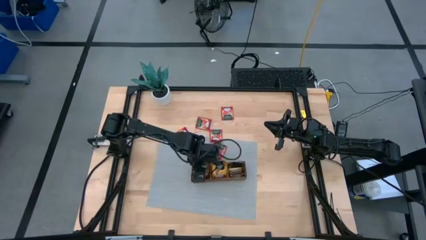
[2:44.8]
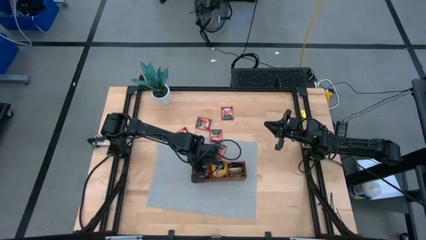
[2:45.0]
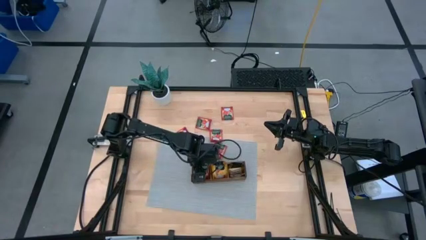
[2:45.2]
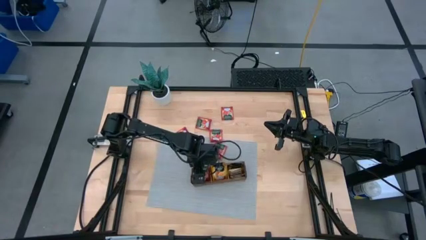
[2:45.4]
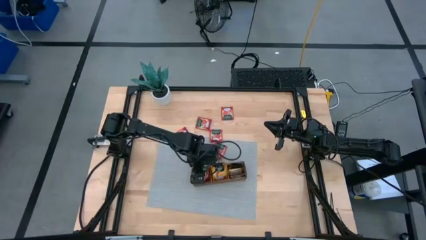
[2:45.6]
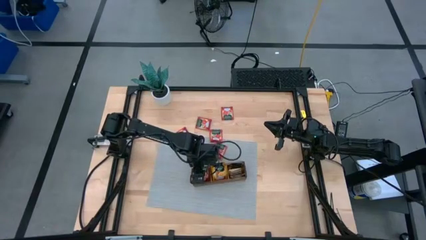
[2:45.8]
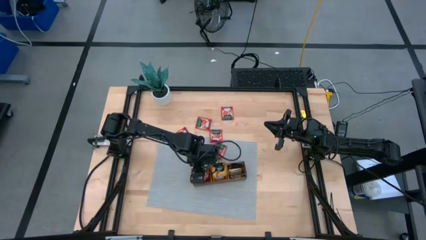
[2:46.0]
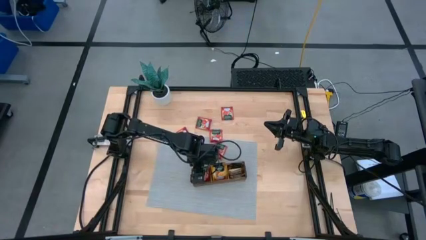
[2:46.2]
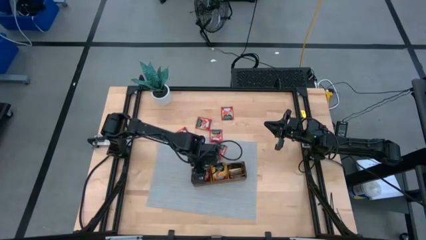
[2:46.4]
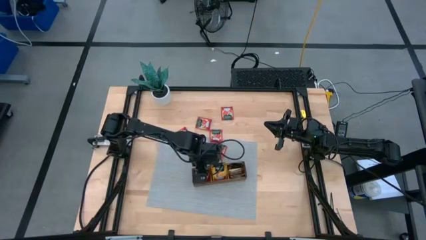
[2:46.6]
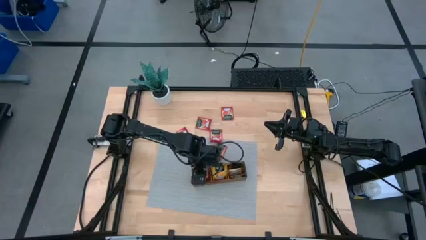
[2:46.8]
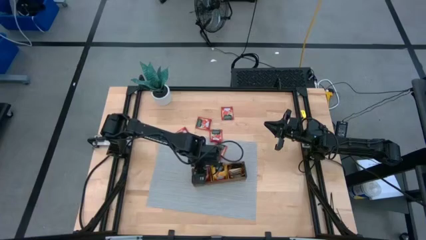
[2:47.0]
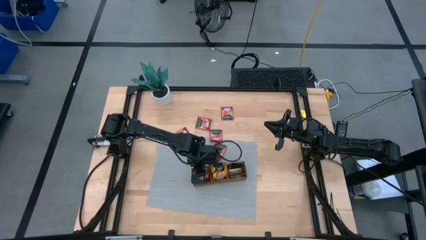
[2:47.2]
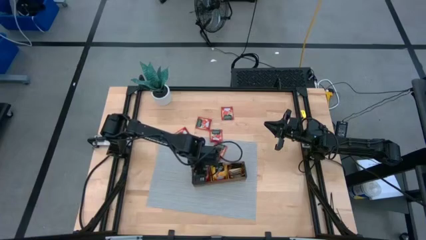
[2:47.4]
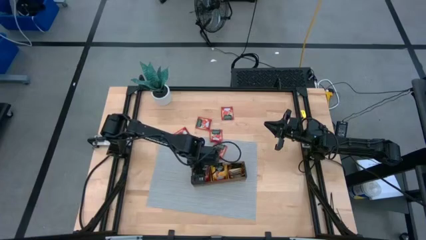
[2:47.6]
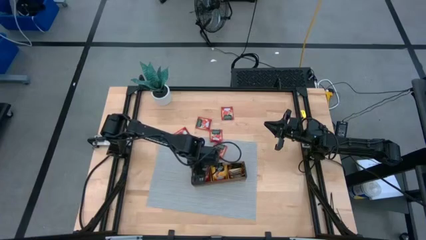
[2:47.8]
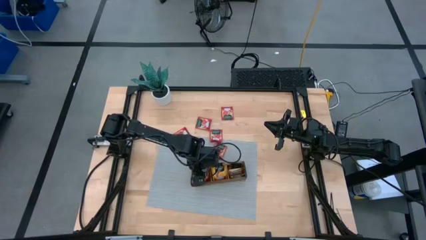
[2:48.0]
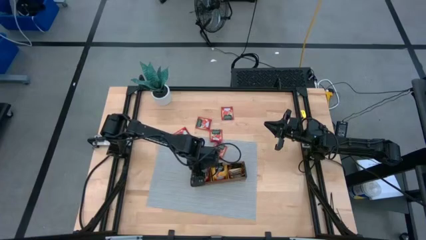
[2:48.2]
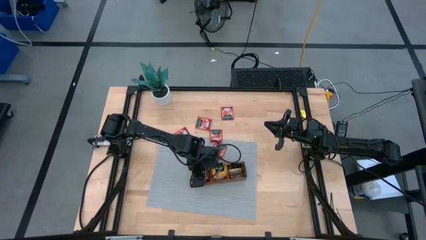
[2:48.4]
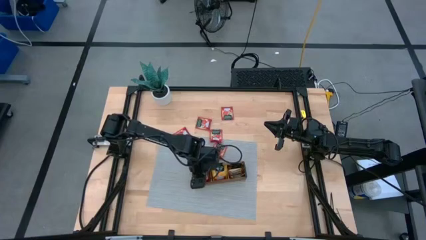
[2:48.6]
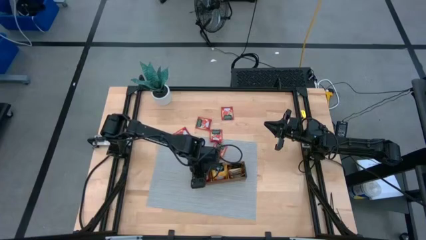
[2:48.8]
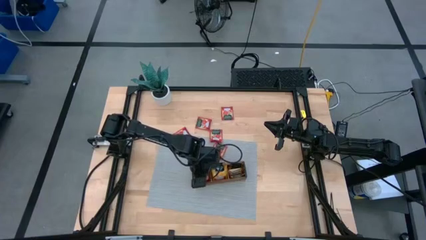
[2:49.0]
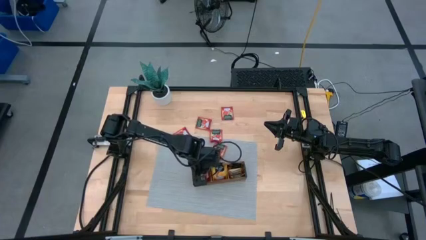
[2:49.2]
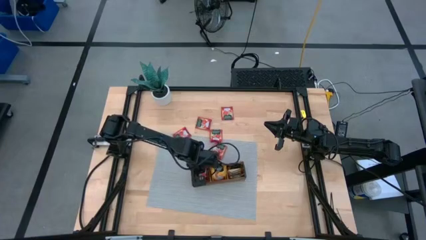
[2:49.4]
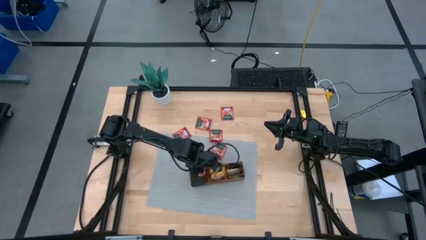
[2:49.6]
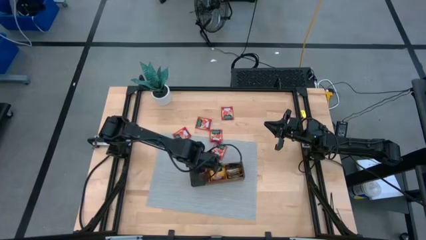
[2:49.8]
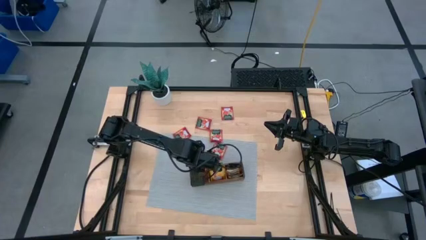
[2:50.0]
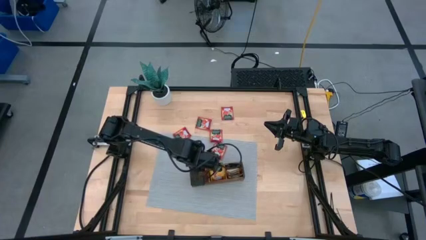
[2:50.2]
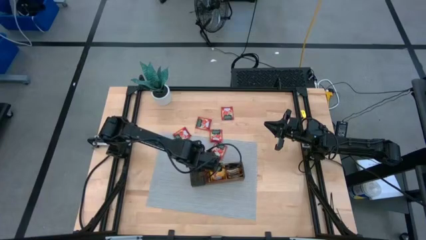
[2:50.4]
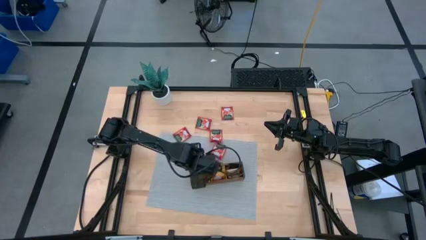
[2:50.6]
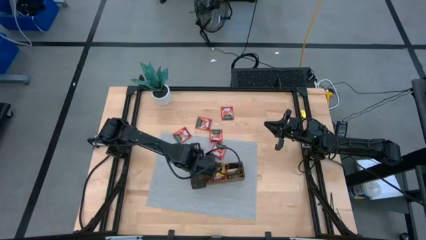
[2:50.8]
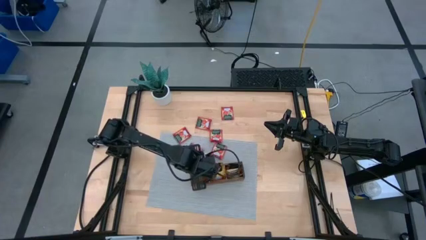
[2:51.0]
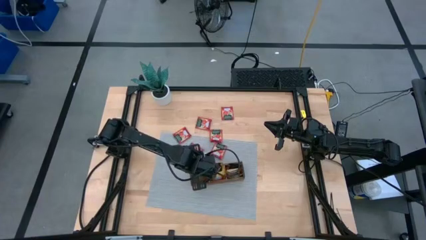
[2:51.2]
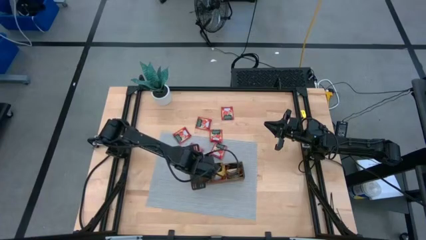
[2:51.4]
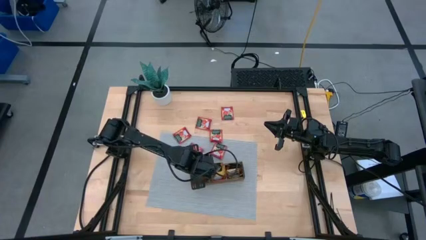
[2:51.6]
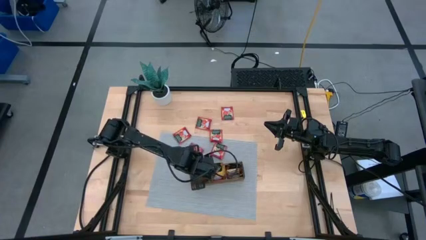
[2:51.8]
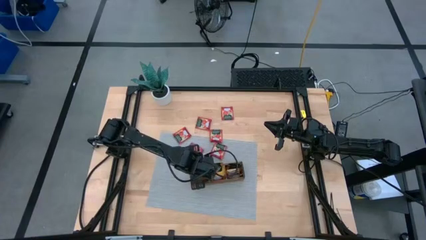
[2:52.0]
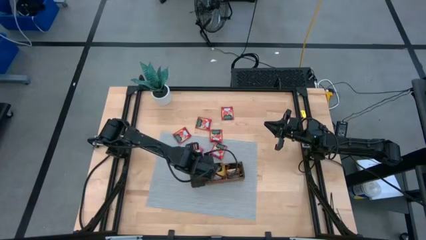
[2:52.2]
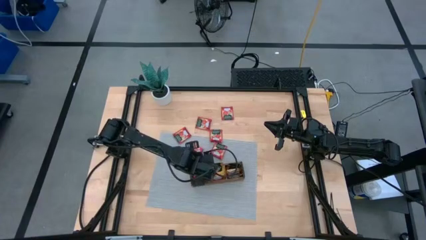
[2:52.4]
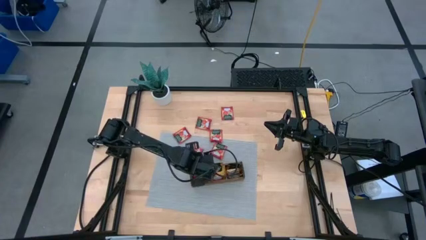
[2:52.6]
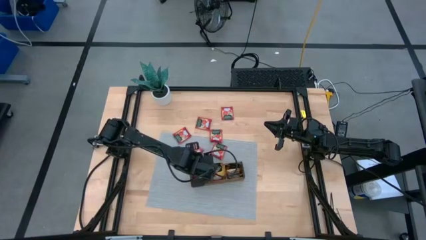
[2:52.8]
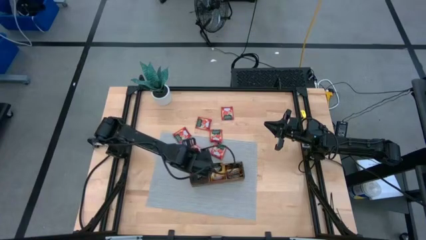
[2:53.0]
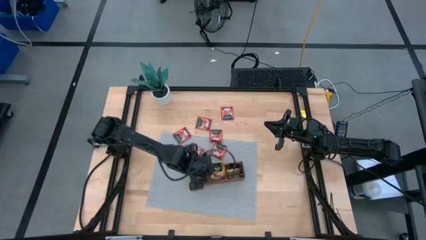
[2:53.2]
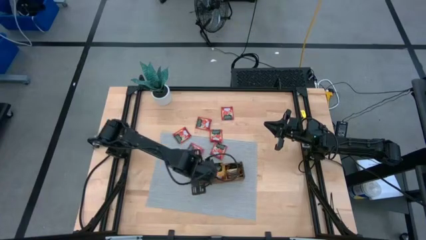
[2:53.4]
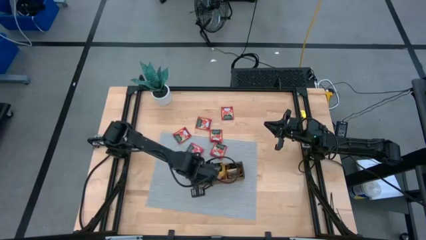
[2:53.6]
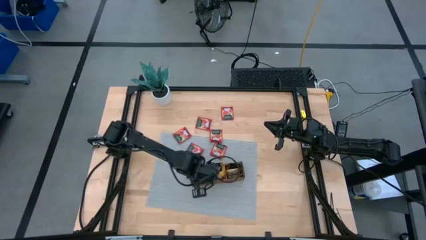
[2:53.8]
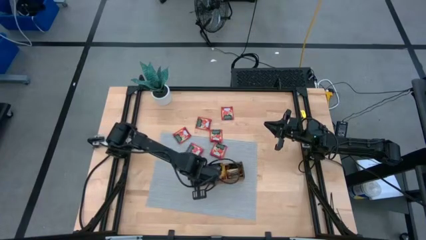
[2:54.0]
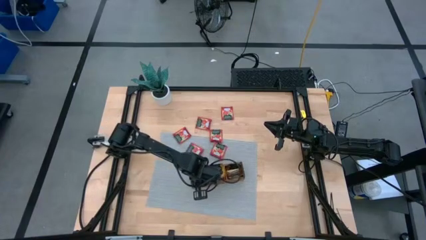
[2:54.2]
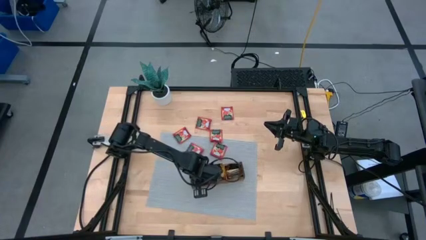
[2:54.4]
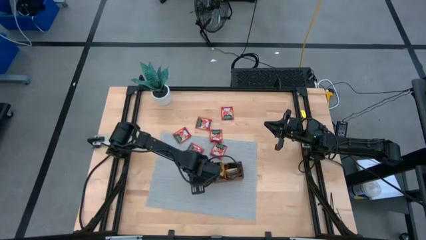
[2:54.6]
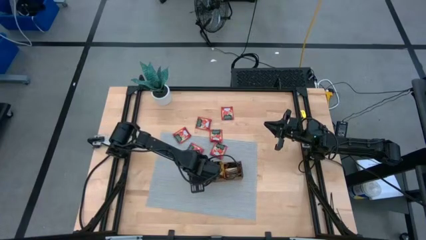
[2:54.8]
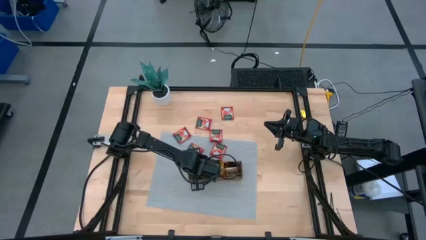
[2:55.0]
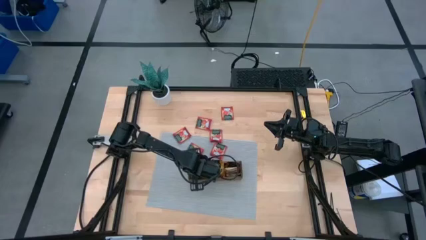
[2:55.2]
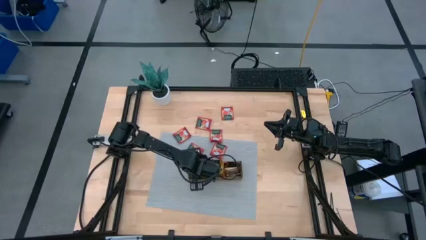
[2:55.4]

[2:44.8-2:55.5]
Task: Pick & Place Tea
Put the red tea bag into the left compartment of the wood organizer

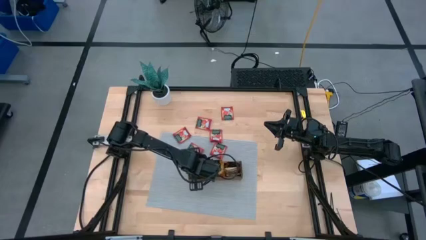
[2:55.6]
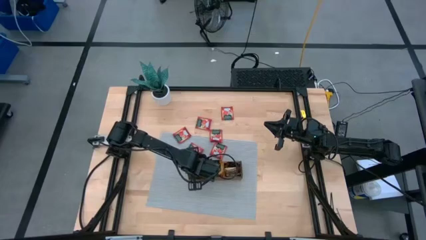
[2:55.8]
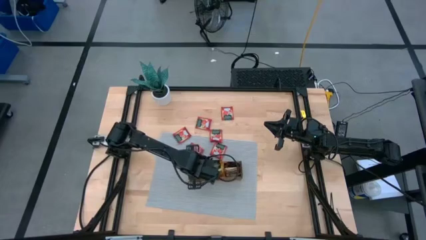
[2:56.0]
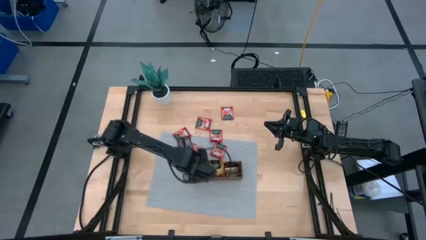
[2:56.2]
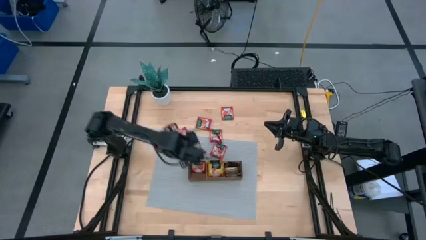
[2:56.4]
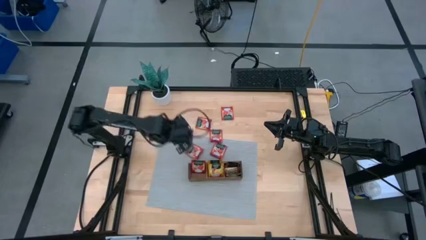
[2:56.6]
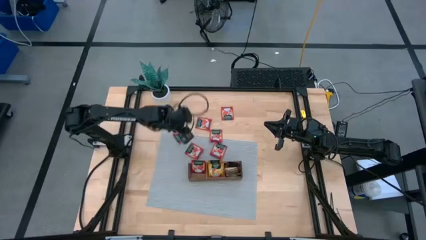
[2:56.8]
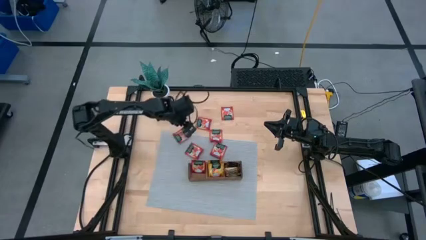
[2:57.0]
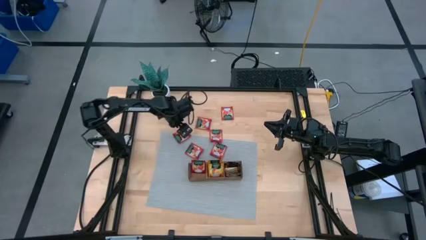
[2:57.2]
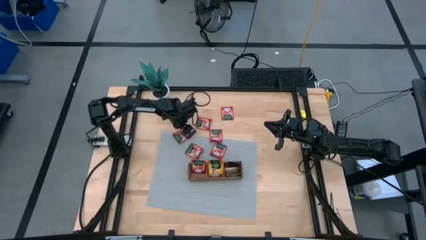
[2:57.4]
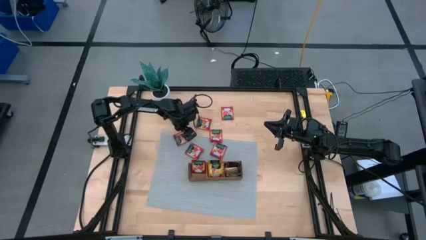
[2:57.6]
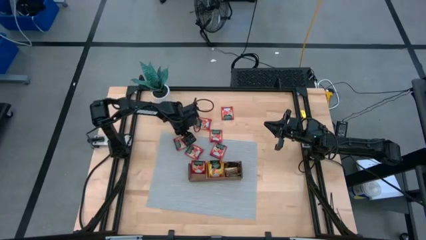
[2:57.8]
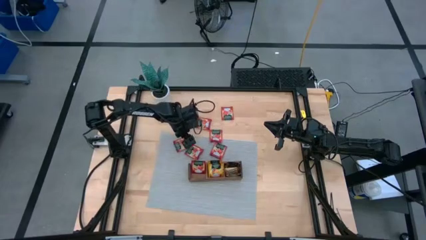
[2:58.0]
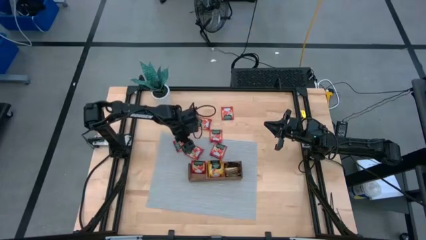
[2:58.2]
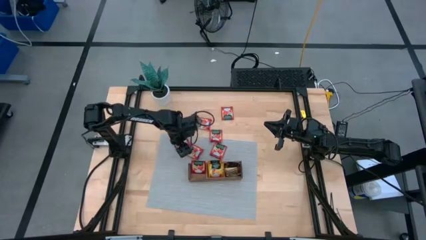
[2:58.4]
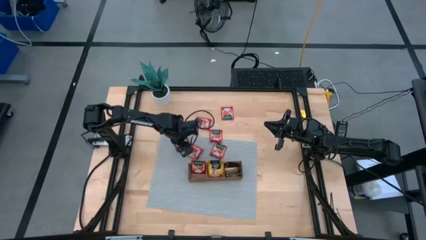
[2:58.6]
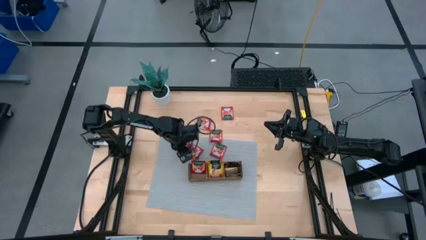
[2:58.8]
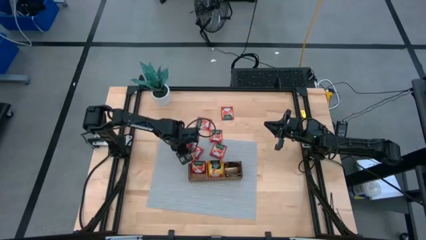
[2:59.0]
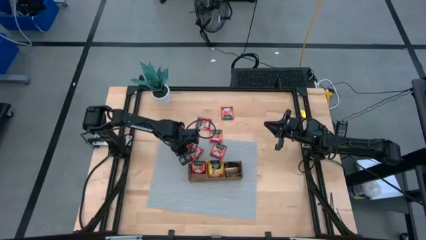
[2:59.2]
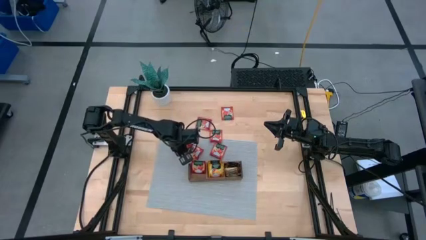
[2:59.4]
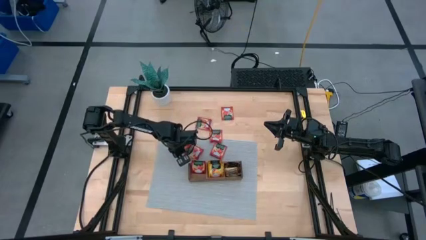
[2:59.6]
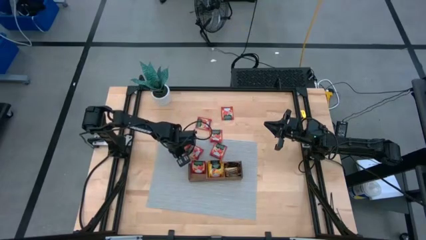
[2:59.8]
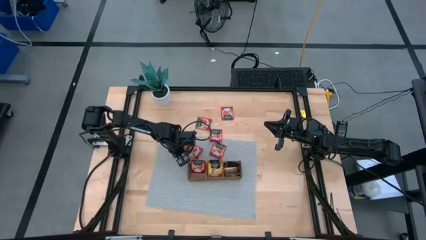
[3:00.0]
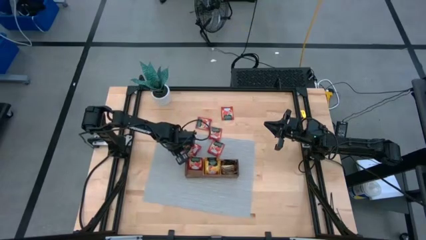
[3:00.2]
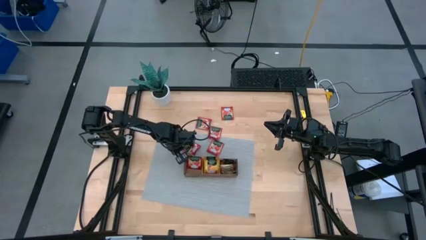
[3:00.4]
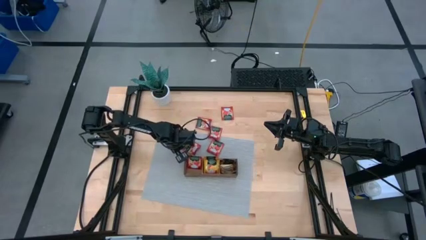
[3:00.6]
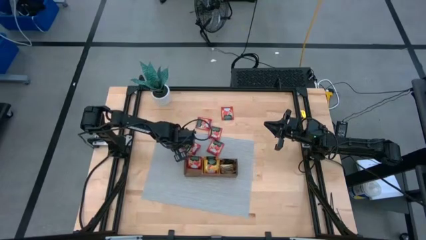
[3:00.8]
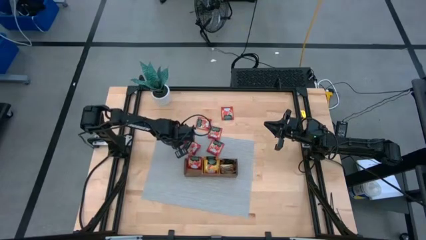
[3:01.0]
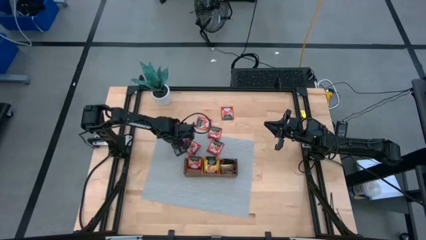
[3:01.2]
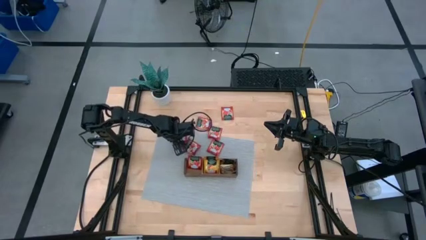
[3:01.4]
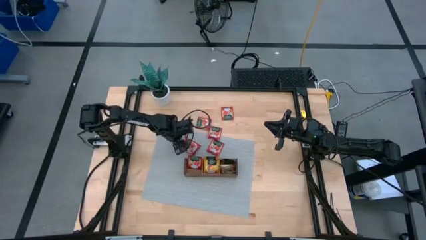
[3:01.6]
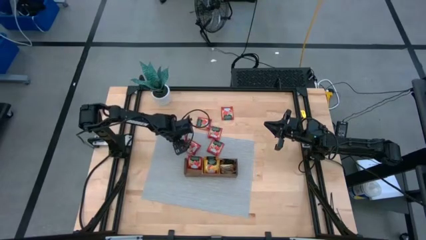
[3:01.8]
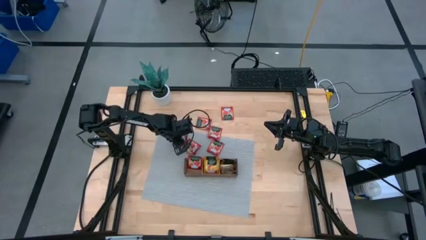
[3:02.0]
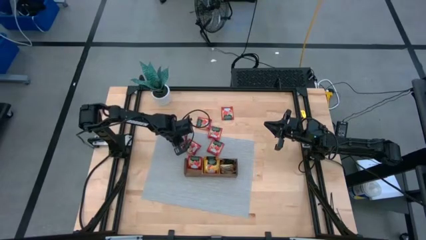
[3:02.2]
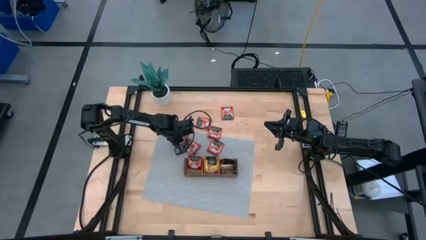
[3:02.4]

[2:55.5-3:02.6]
Put the red tea bag into the left compartment of the wood organizer
